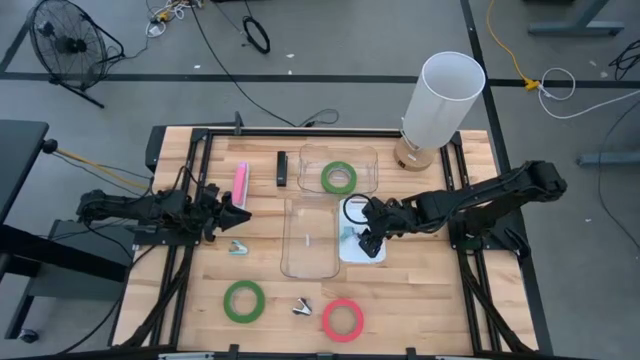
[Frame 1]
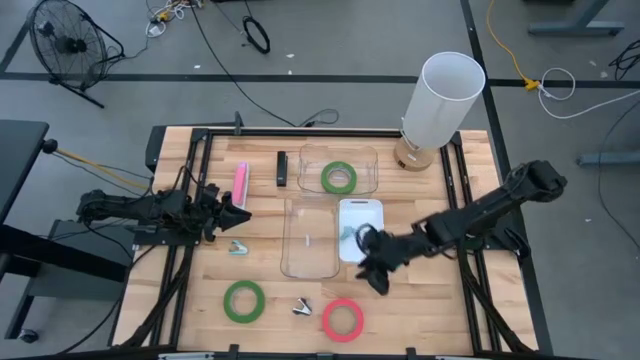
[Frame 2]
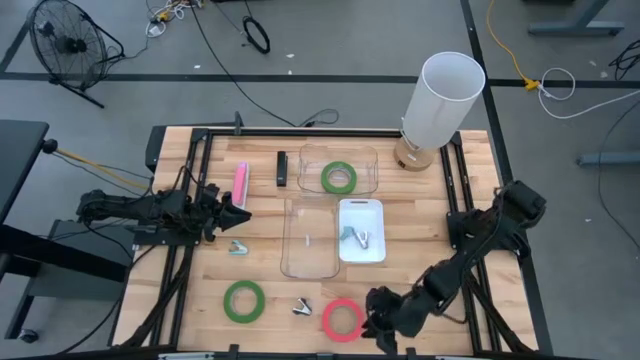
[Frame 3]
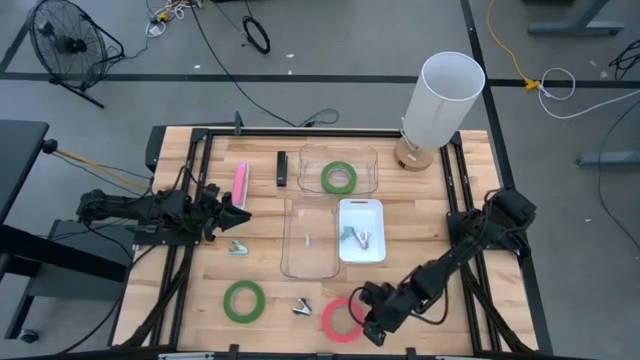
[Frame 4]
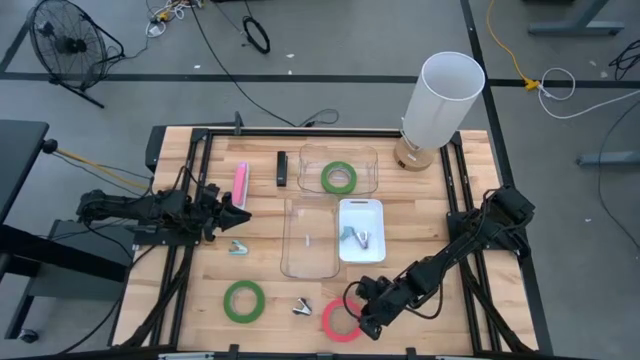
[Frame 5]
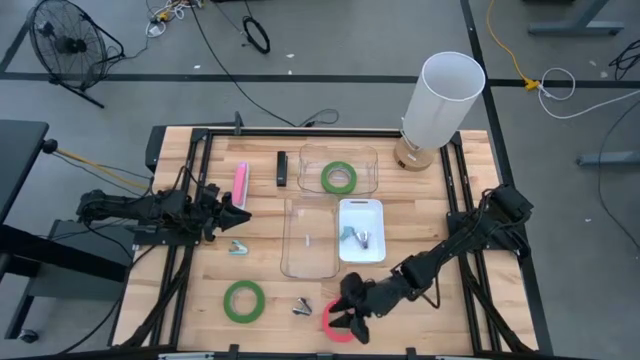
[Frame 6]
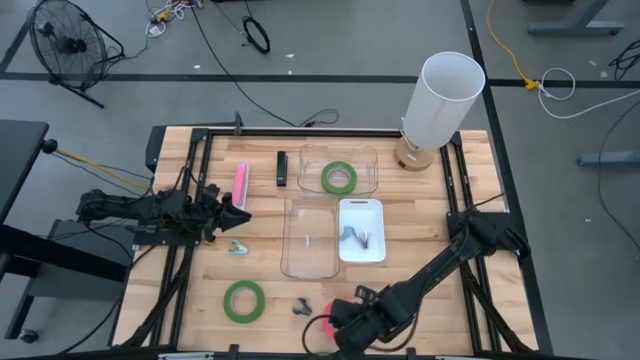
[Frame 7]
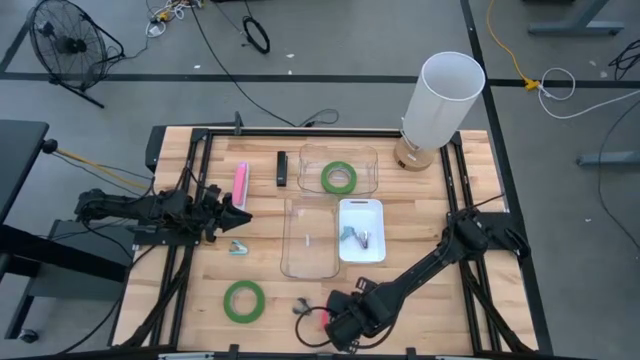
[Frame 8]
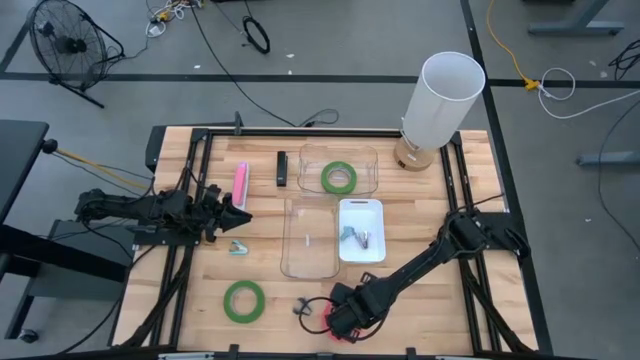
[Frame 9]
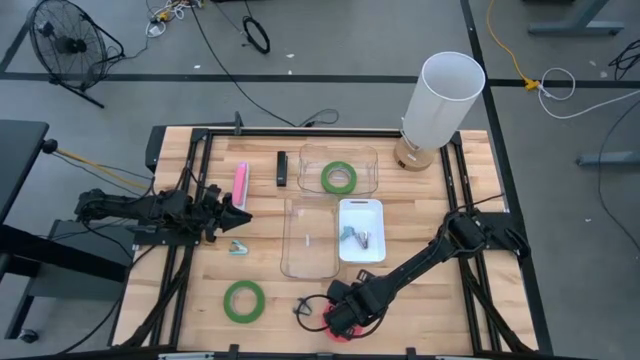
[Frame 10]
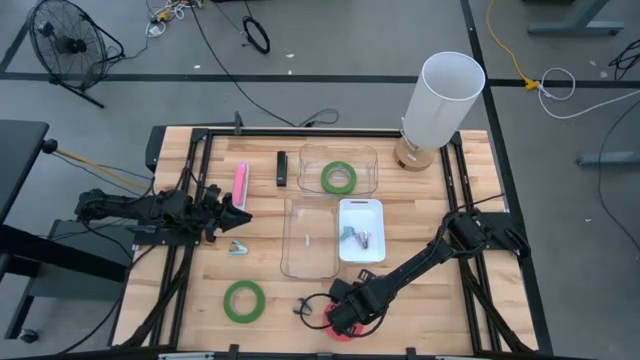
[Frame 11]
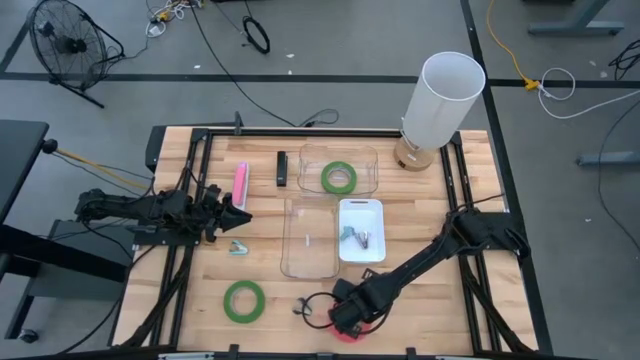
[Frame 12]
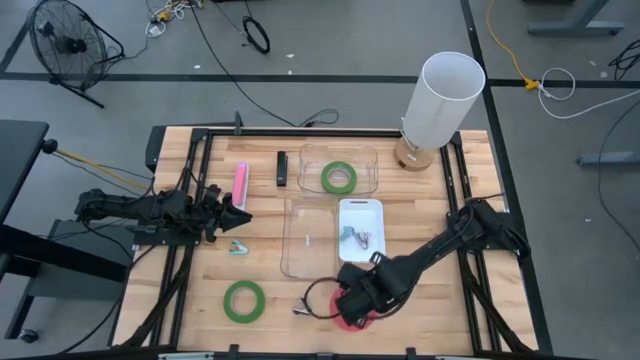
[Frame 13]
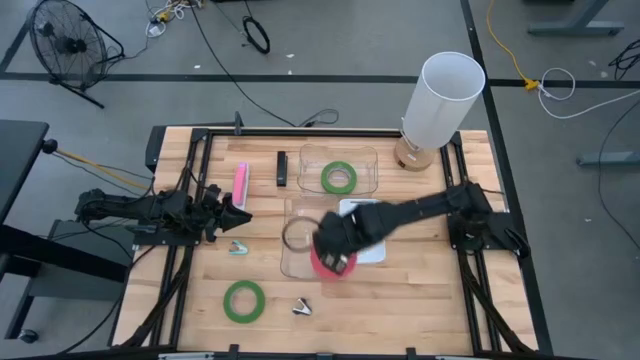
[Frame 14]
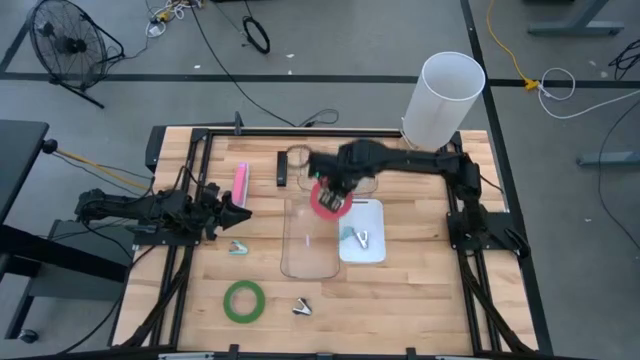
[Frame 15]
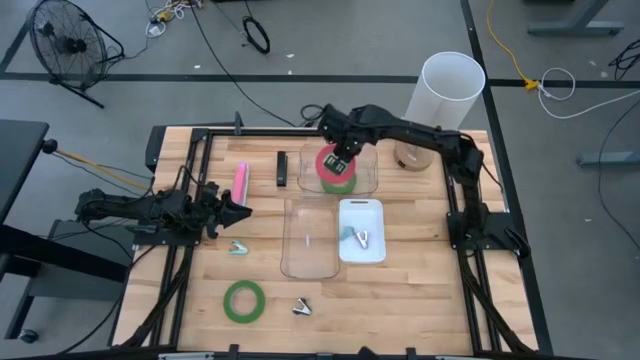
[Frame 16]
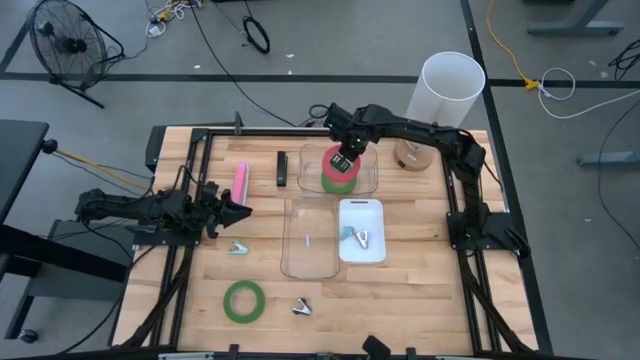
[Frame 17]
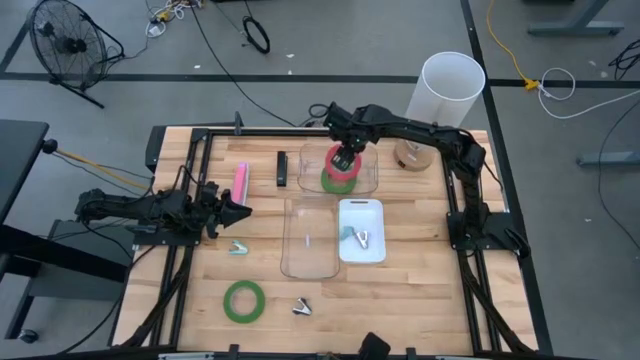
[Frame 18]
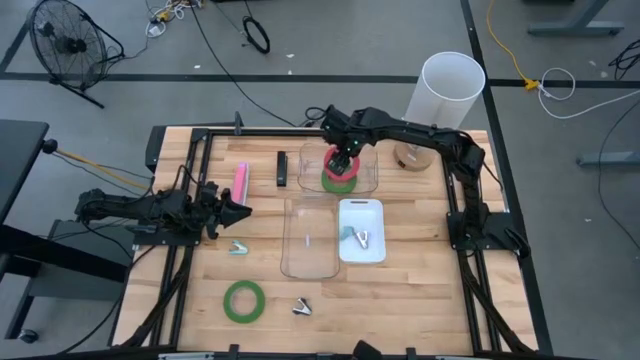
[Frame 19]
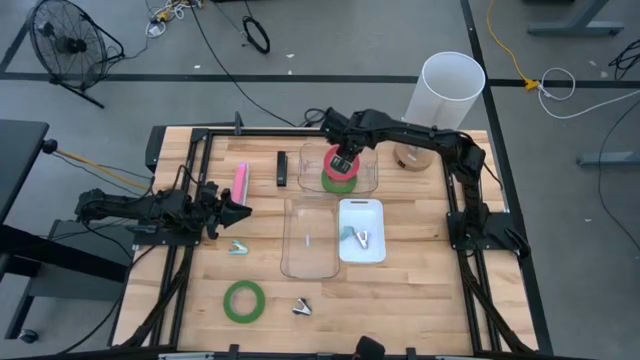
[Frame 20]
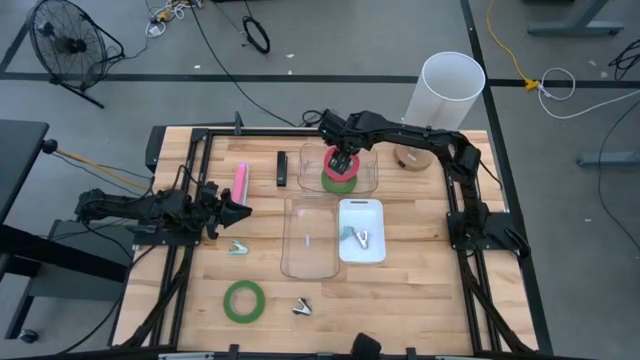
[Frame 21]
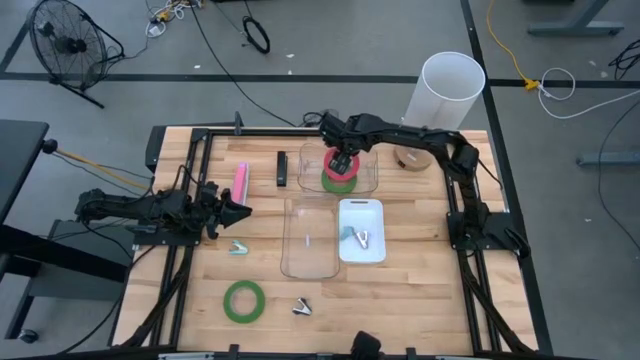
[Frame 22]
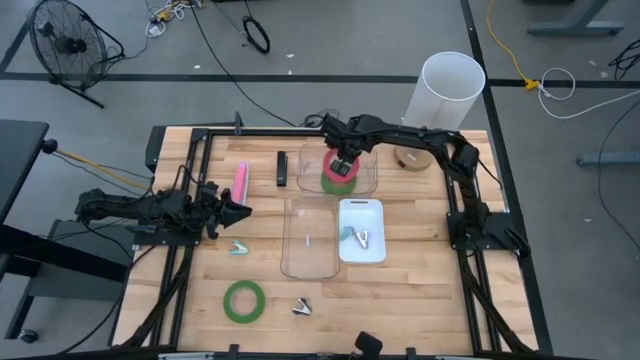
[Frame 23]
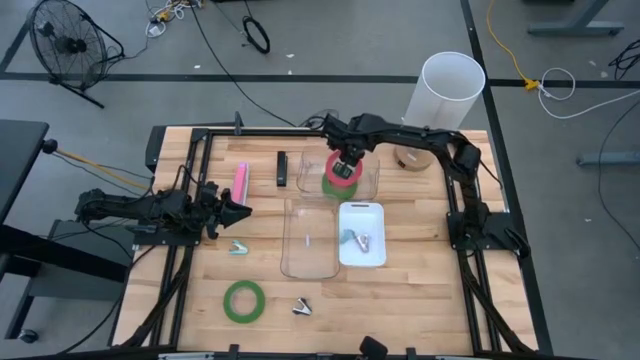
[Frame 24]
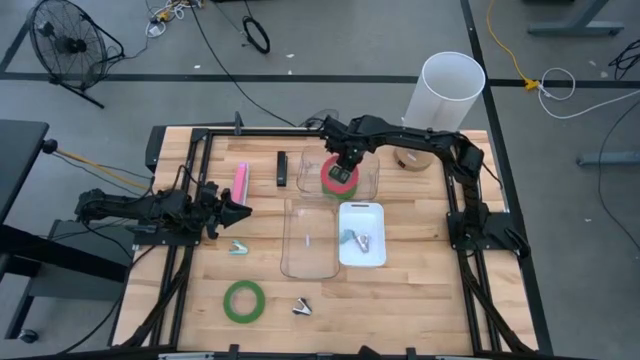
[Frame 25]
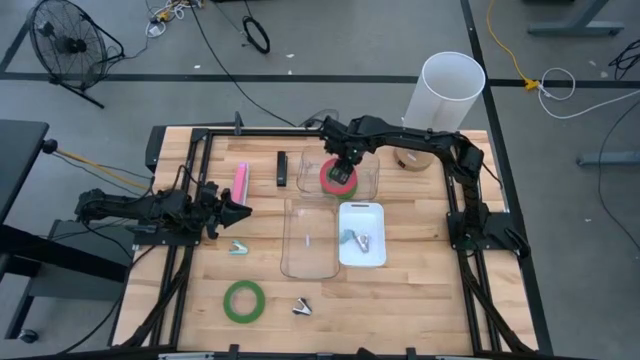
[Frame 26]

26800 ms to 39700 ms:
Task: Pick and place Stapler, Stapler remover, tape
Put the pink tape into the top transparent bin

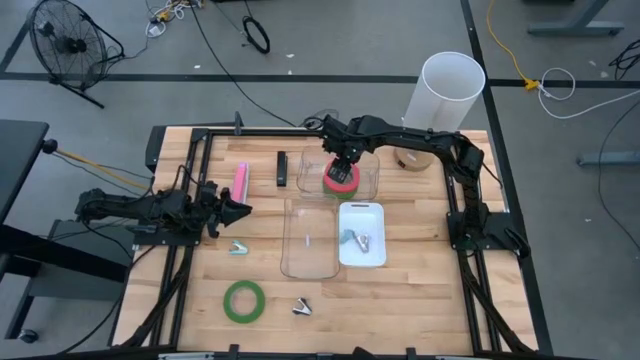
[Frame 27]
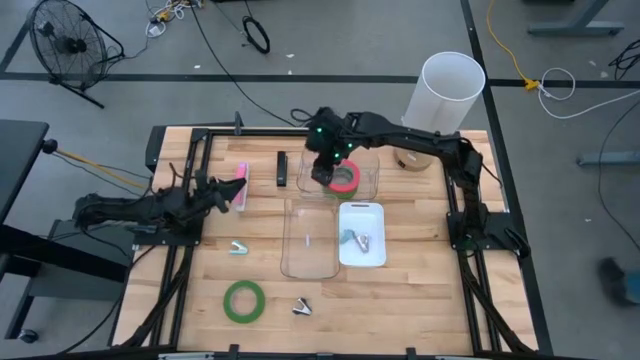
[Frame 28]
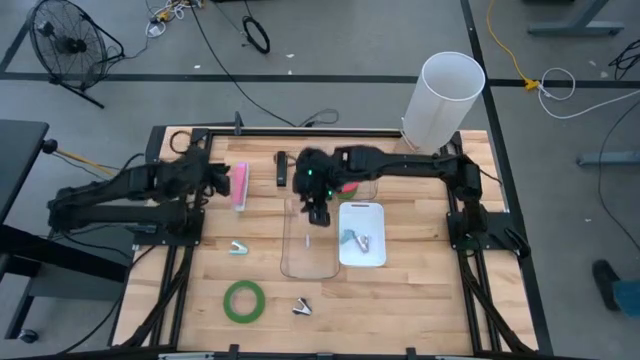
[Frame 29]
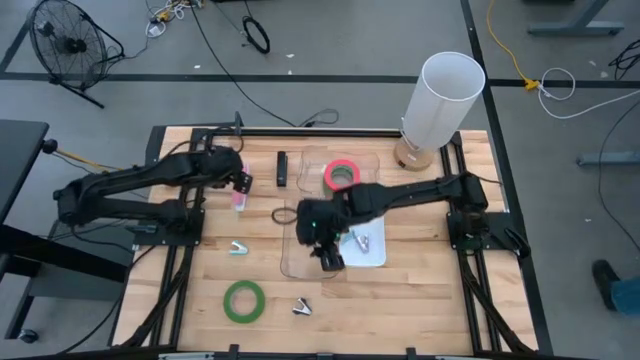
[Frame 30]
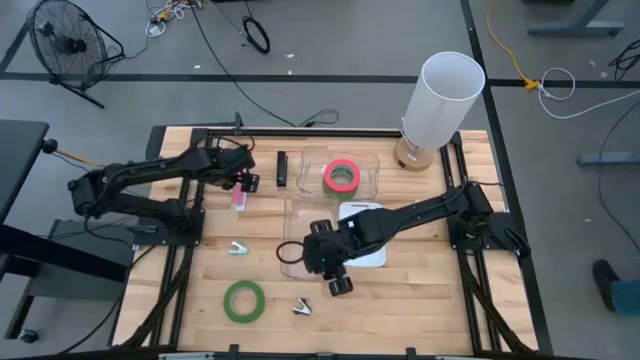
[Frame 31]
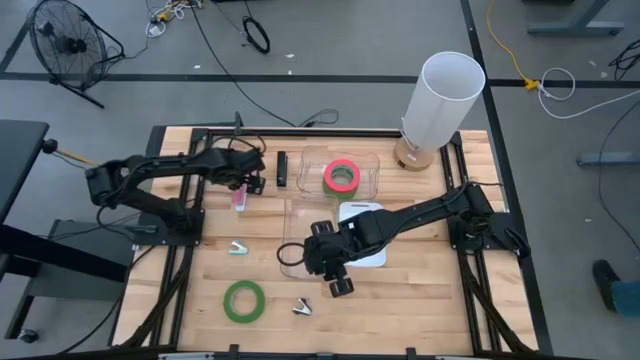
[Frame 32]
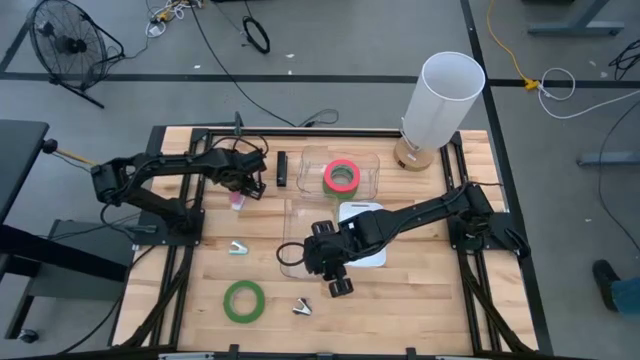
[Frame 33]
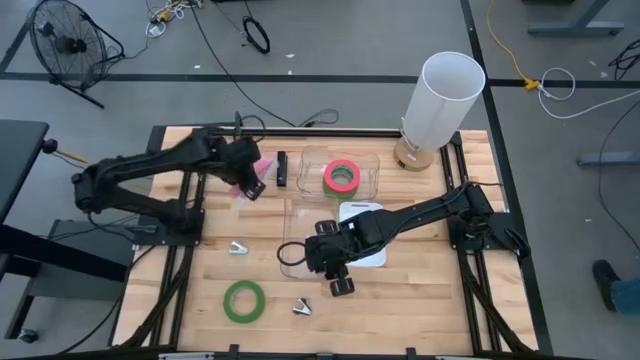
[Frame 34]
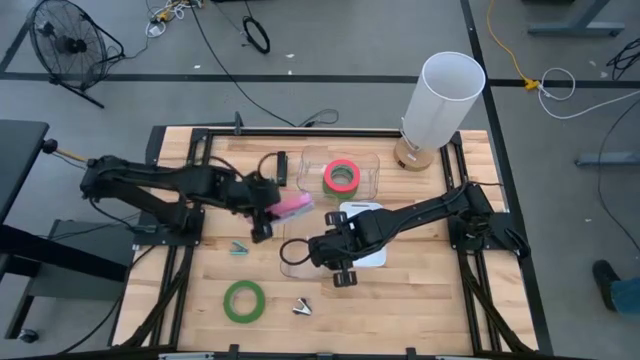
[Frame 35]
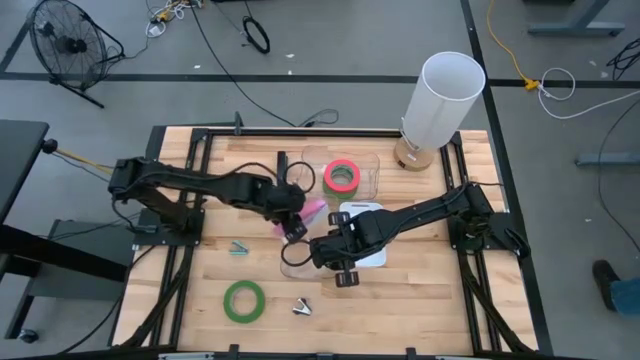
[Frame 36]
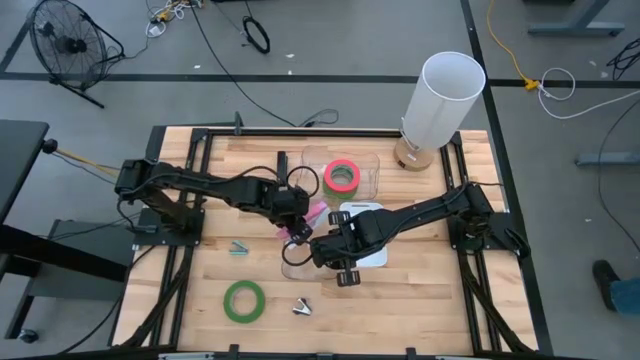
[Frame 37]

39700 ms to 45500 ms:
Put the pink stapler into the bottom transparent bin

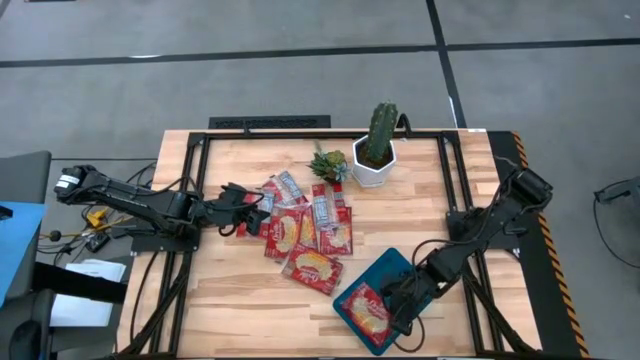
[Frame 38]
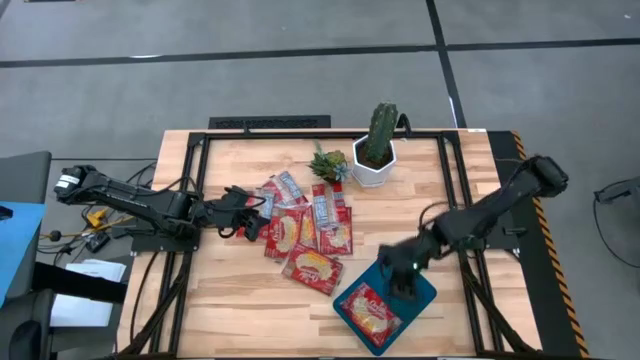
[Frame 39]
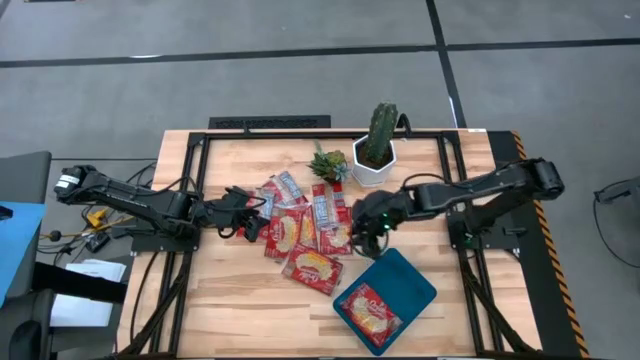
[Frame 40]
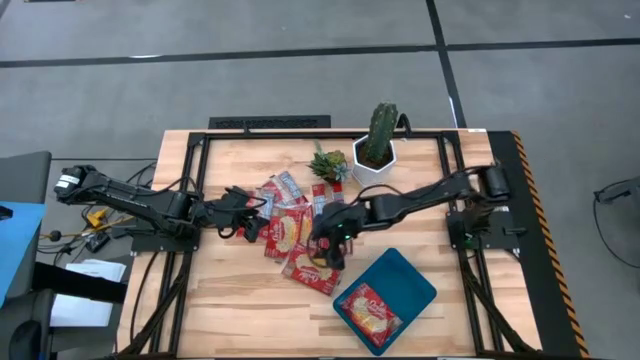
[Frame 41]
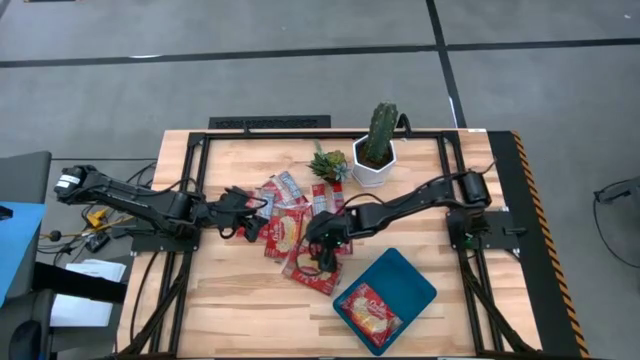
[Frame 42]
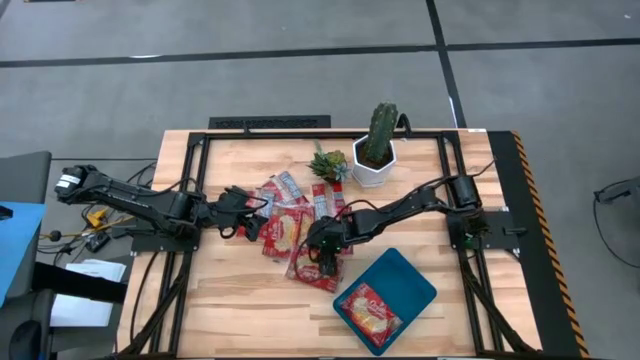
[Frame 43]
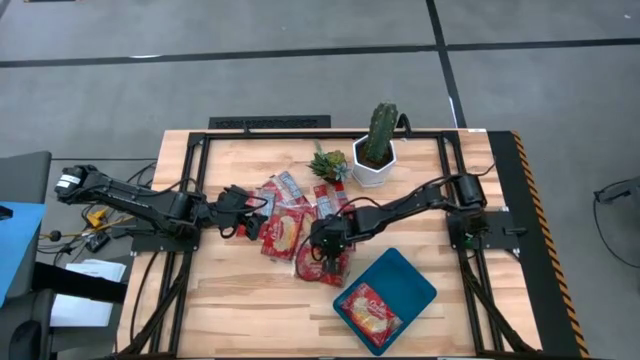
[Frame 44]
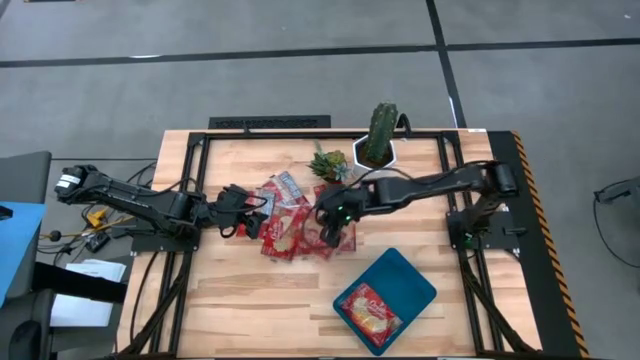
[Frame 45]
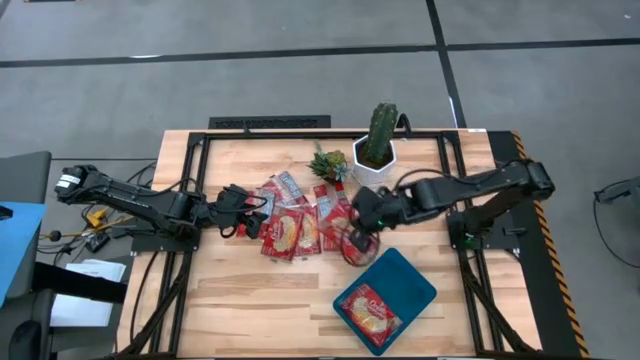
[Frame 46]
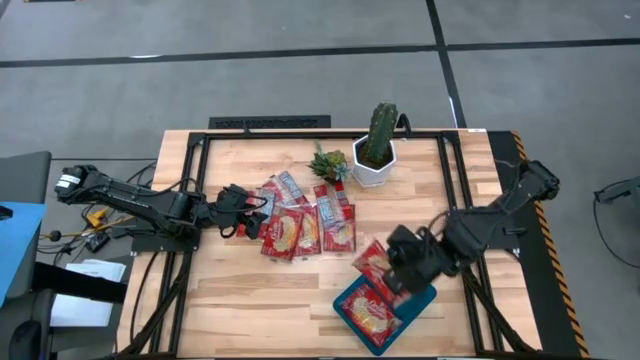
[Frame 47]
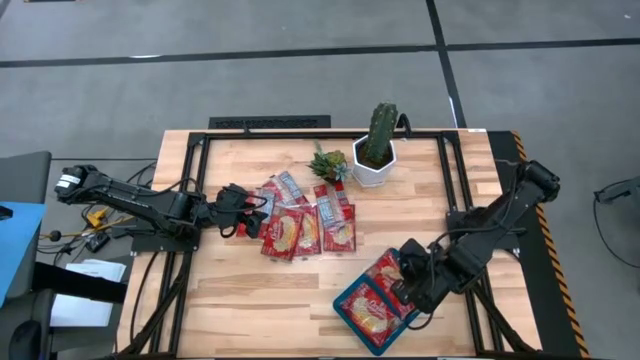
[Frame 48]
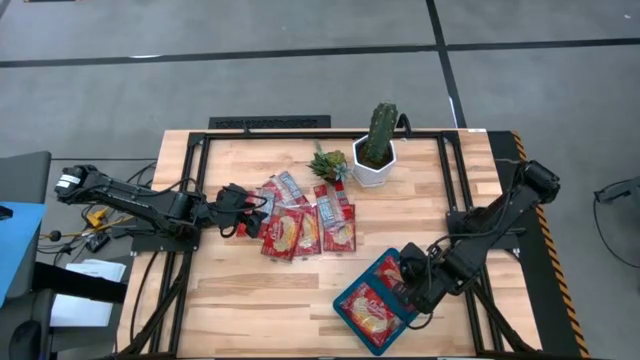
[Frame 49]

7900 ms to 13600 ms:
Task: Sort popcorn bags into baskets
Put the popcorn bag into the bin
